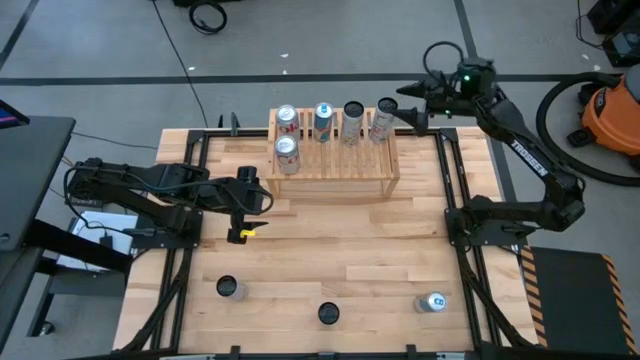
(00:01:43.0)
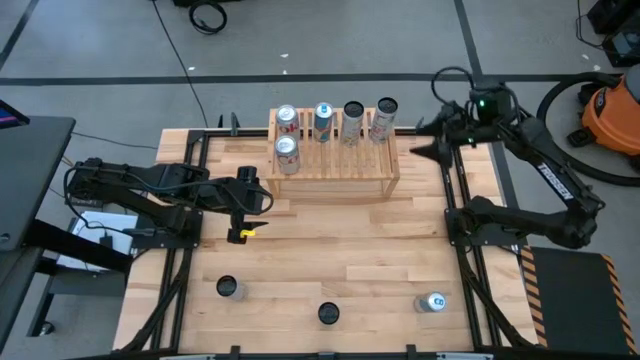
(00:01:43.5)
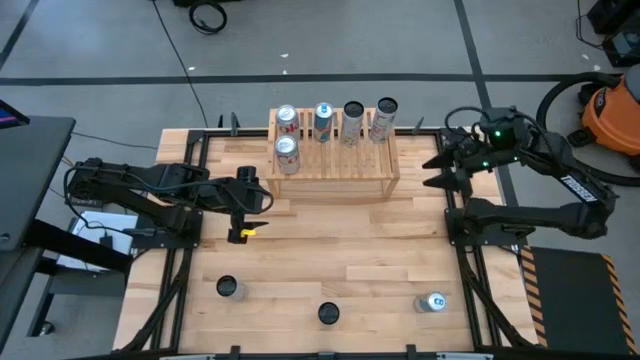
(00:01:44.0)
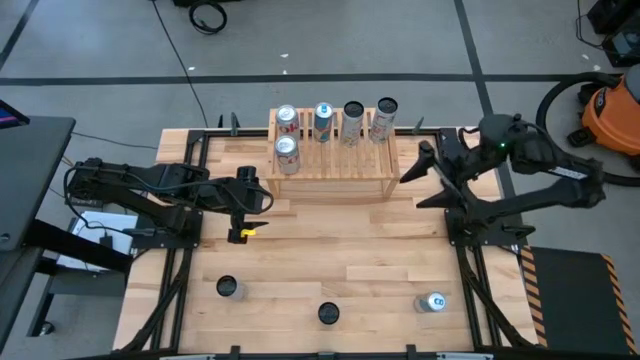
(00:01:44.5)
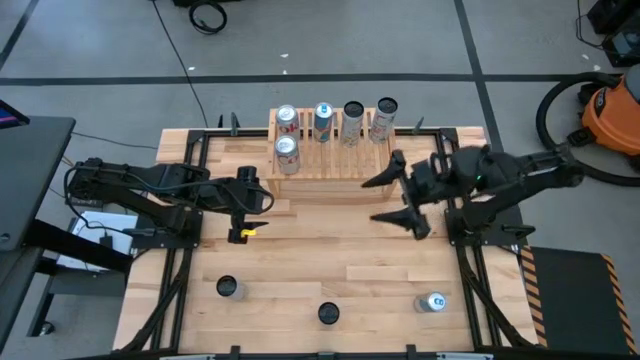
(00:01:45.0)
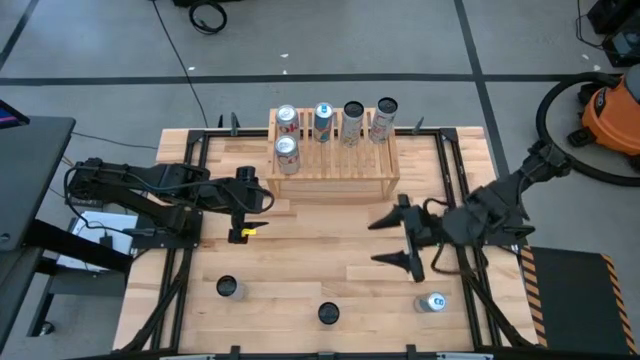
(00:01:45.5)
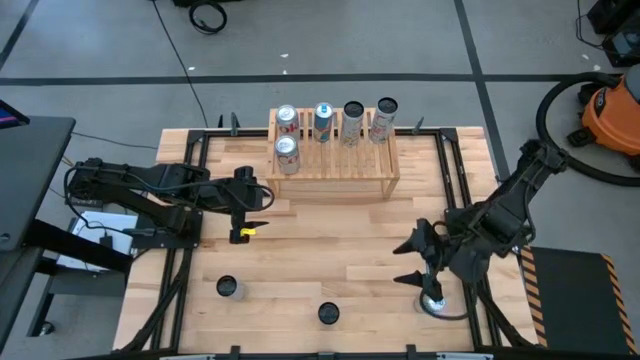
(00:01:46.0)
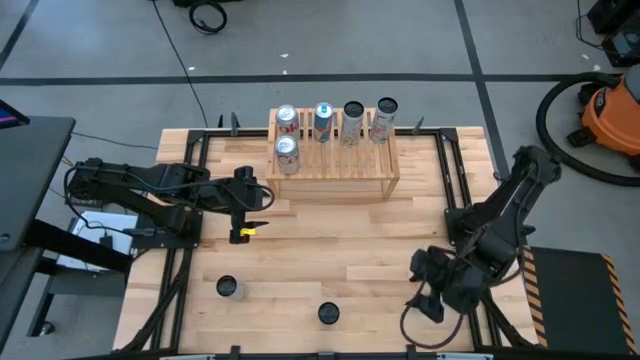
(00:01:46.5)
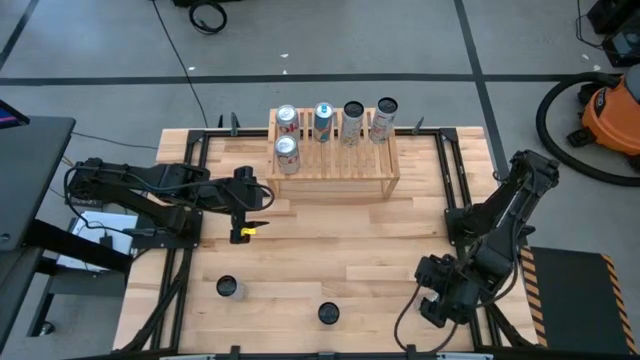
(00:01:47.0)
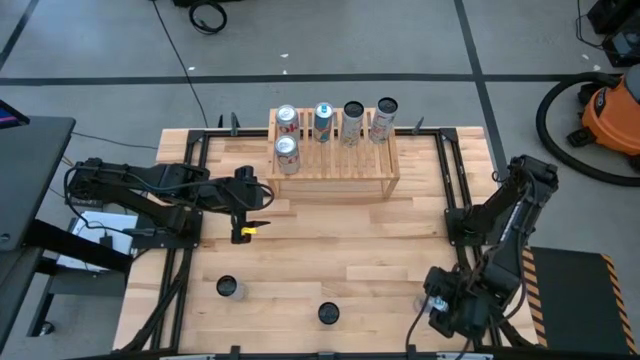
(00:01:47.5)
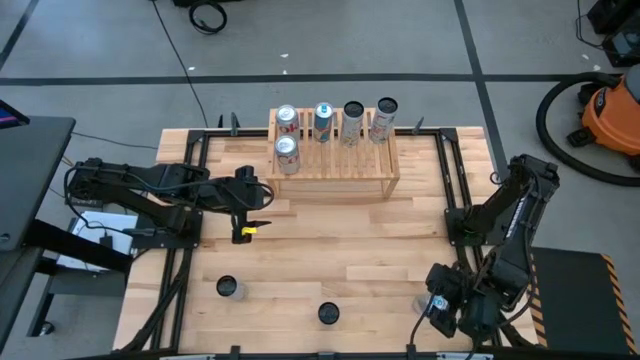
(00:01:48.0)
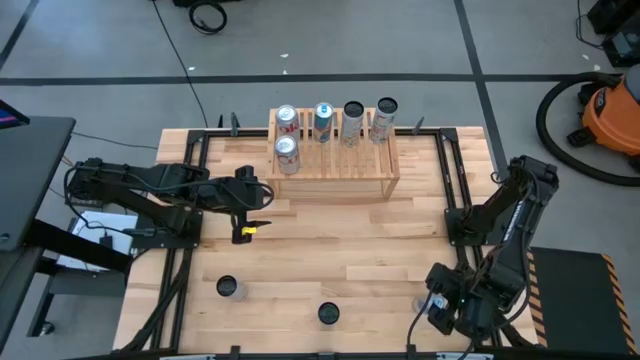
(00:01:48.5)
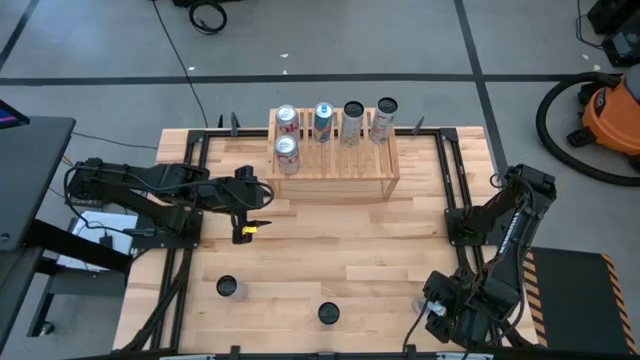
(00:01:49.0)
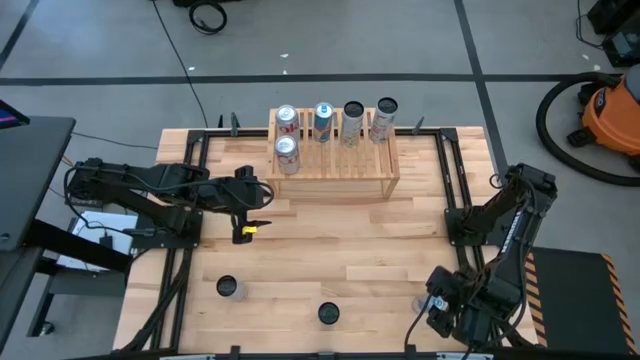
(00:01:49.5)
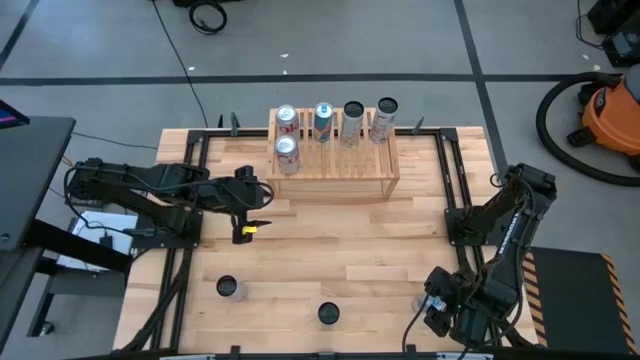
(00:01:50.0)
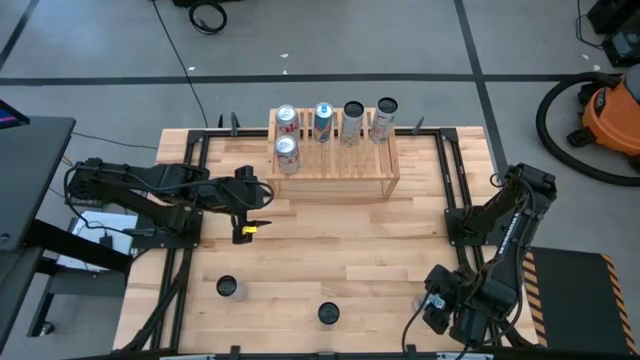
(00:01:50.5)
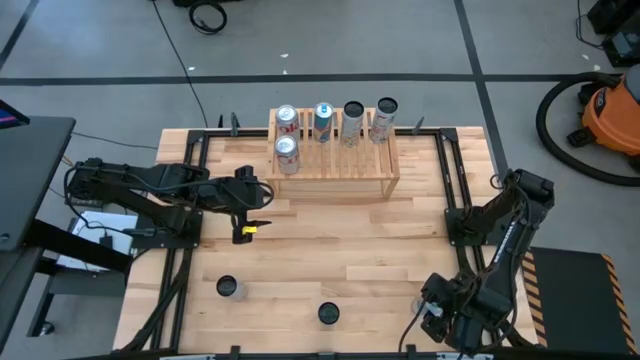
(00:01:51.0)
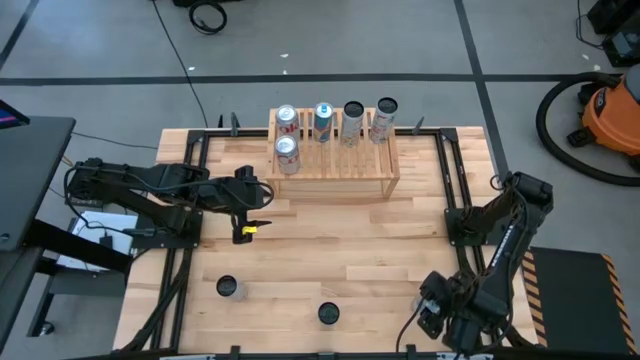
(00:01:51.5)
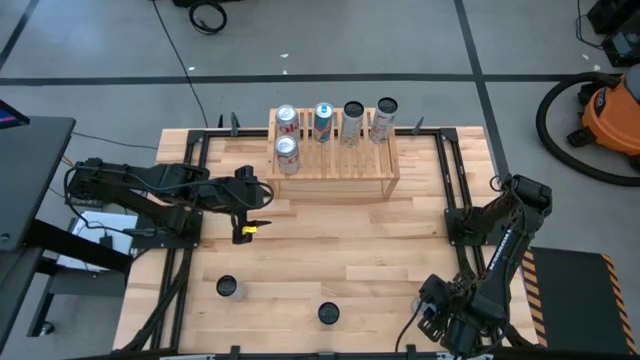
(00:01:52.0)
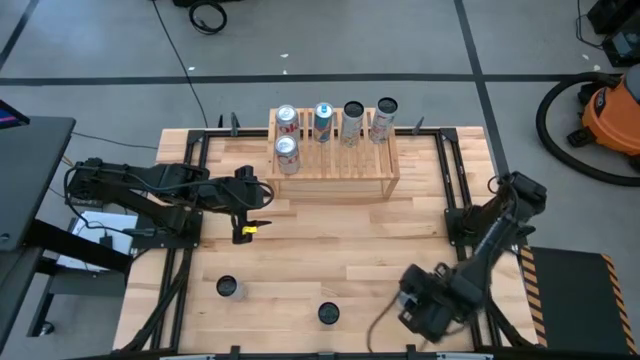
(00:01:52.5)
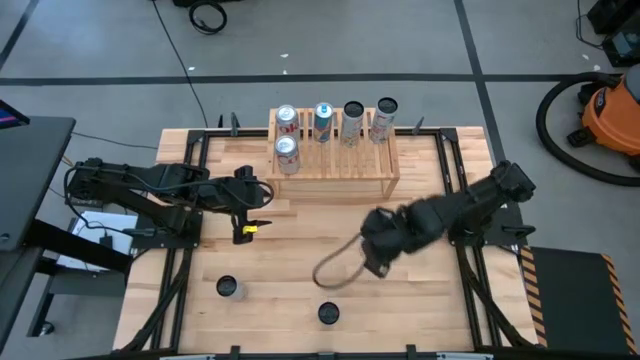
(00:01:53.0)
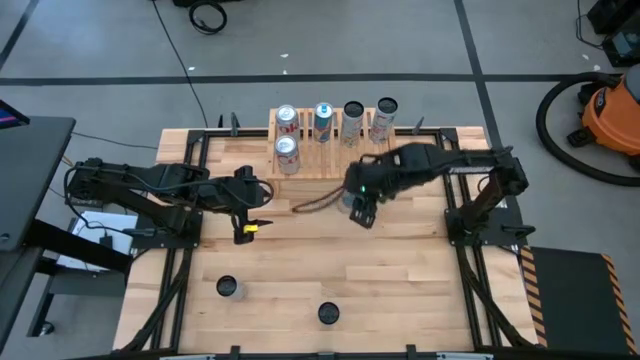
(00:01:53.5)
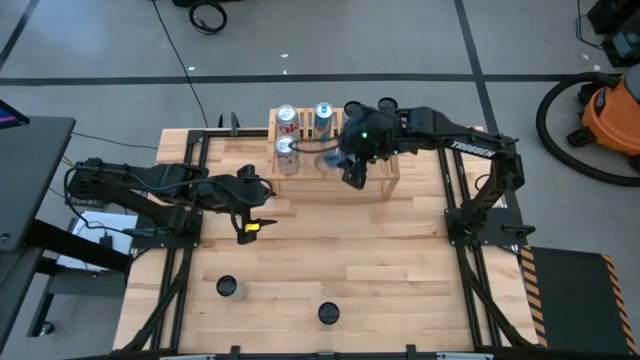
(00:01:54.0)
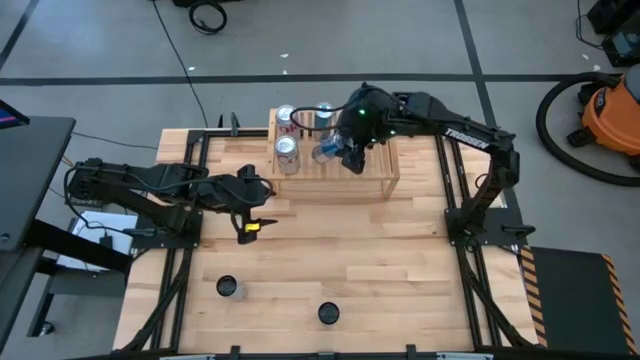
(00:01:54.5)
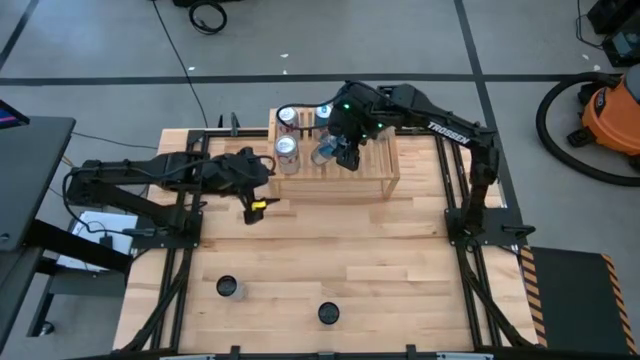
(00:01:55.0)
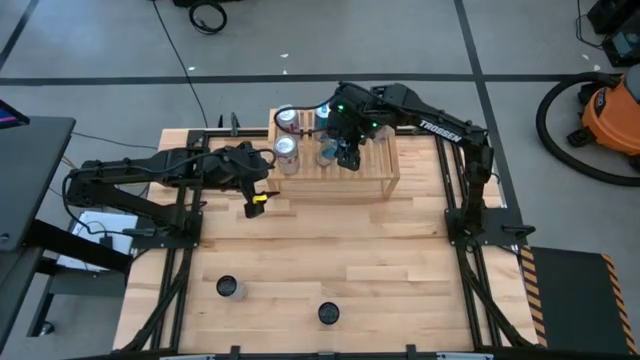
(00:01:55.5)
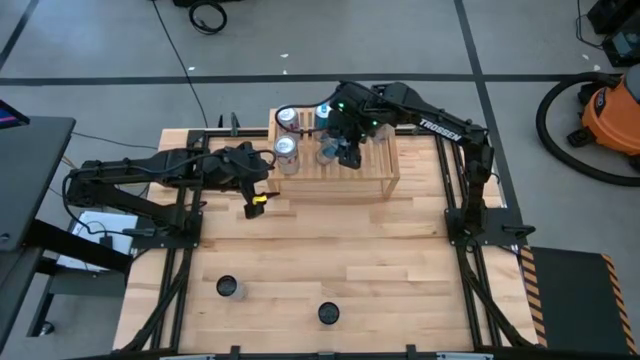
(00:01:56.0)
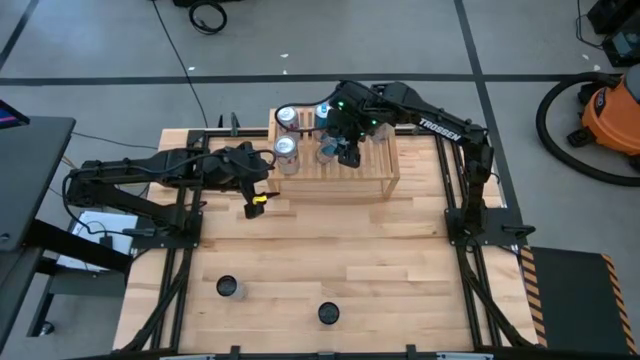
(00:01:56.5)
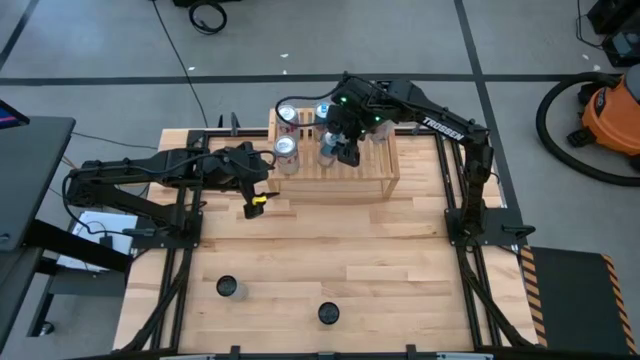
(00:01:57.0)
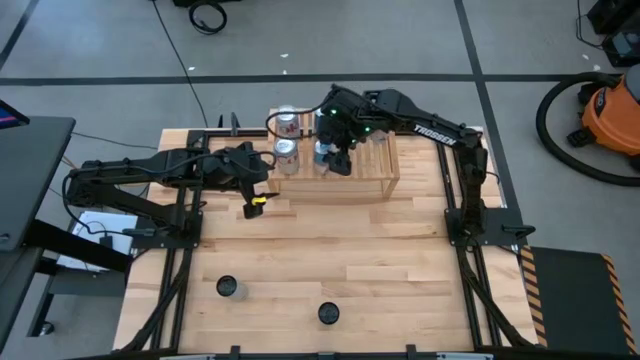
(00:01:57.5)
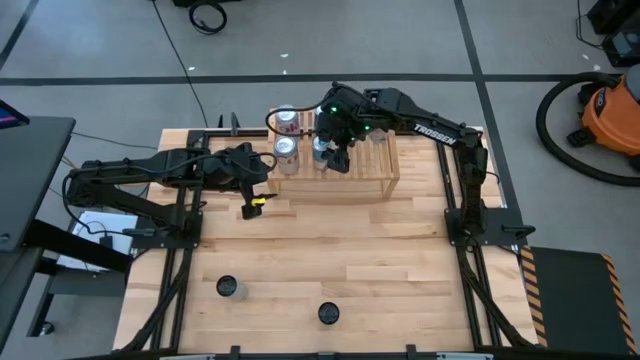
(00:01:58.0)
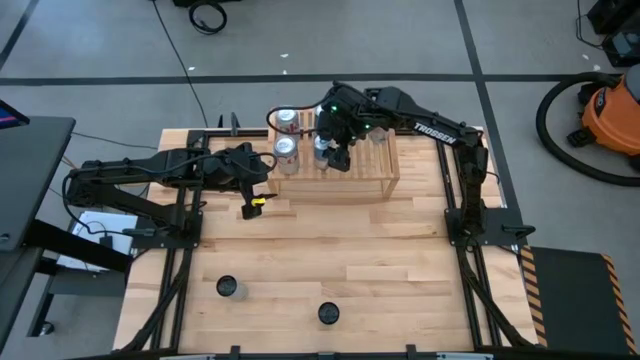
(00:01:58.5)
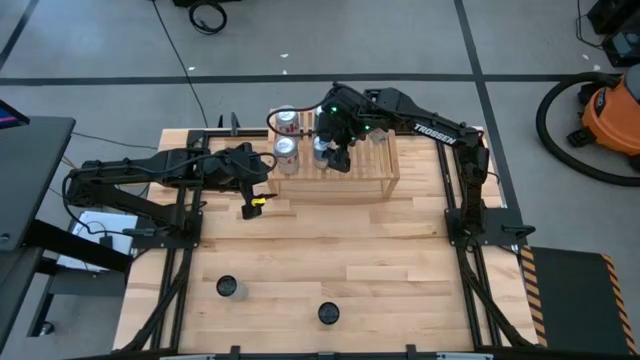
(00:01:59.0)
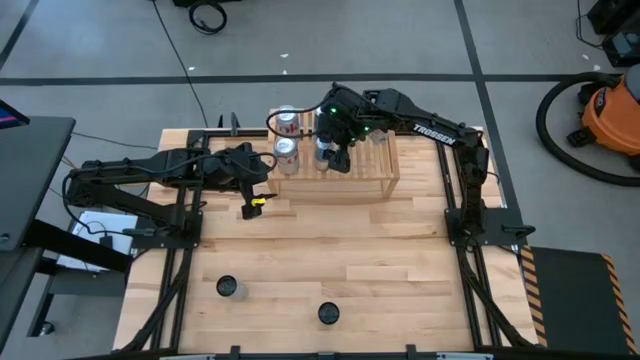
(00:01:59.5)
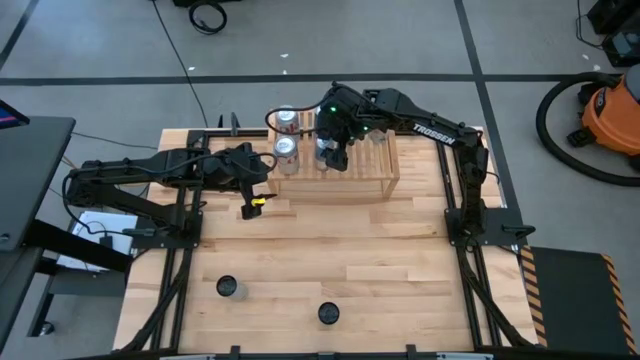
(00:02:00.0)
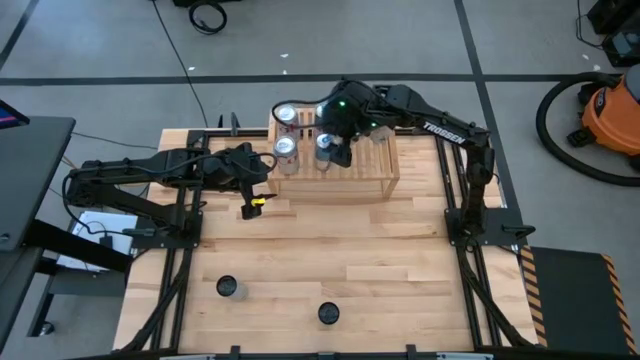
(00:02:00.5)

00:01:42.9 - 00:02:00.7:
Task: Place canned beverage on shelf
Put the blue soda can aligned with the other blue soda can on the shelf
